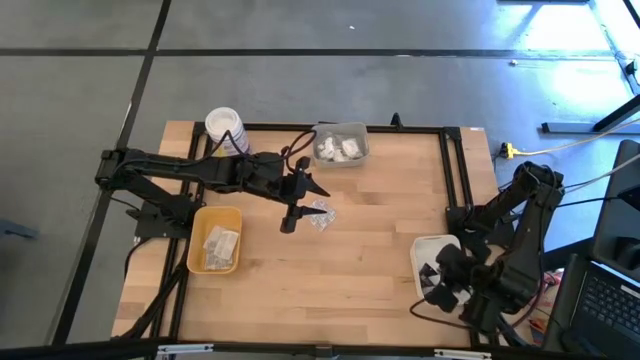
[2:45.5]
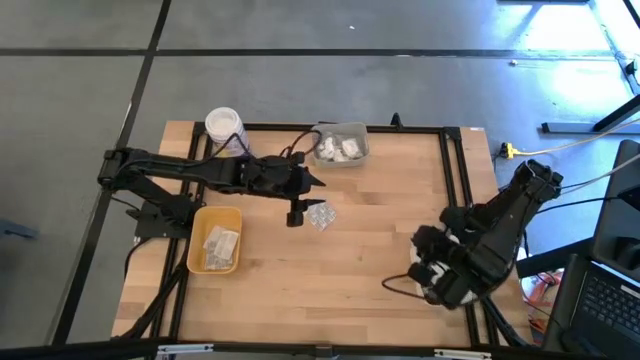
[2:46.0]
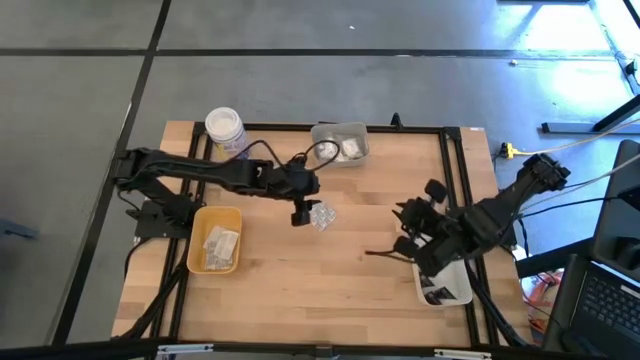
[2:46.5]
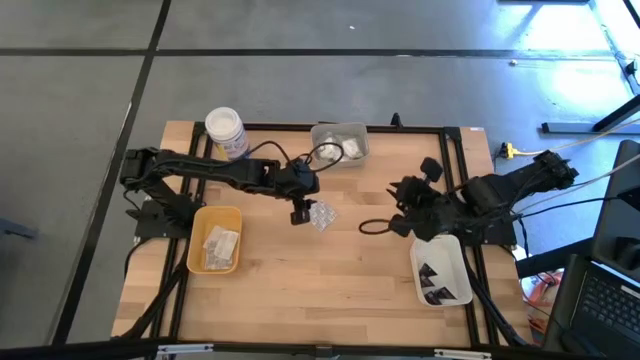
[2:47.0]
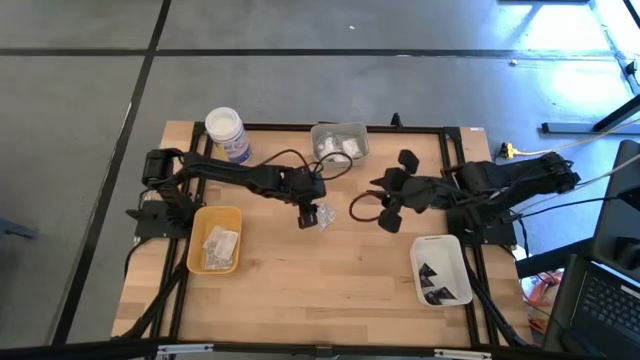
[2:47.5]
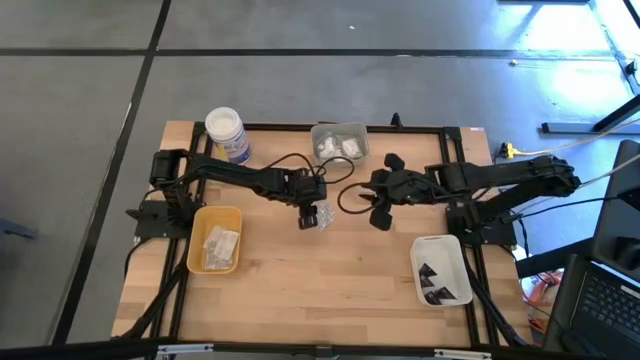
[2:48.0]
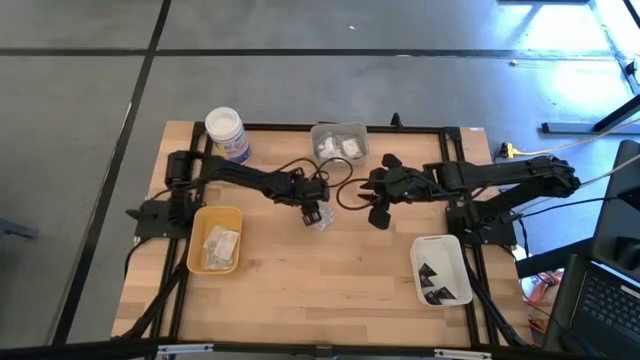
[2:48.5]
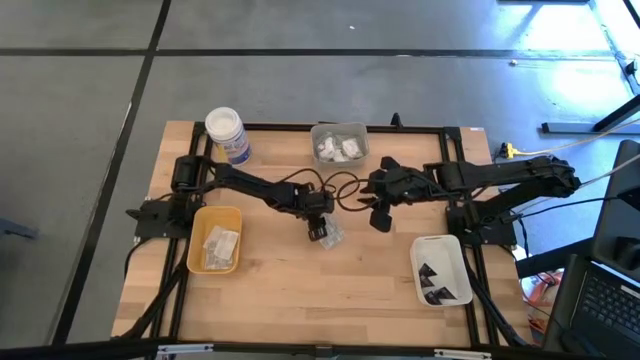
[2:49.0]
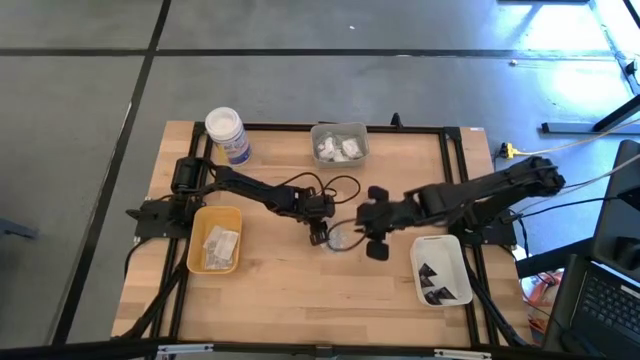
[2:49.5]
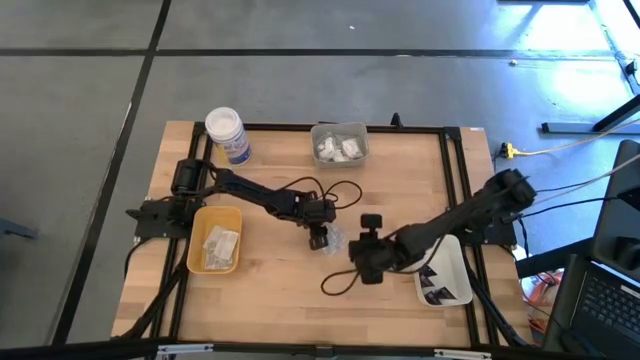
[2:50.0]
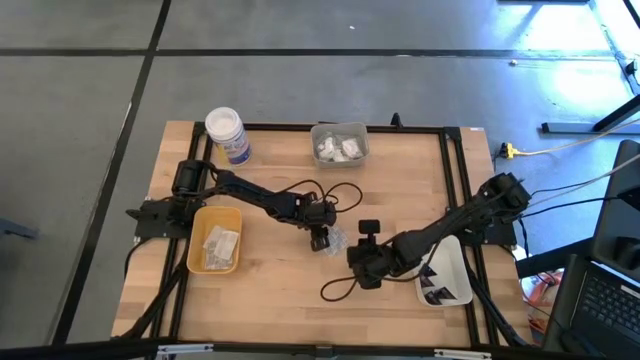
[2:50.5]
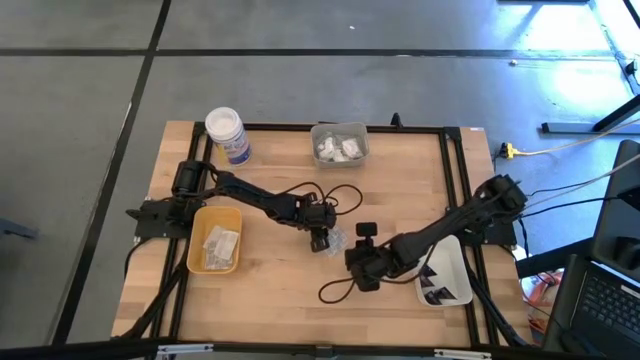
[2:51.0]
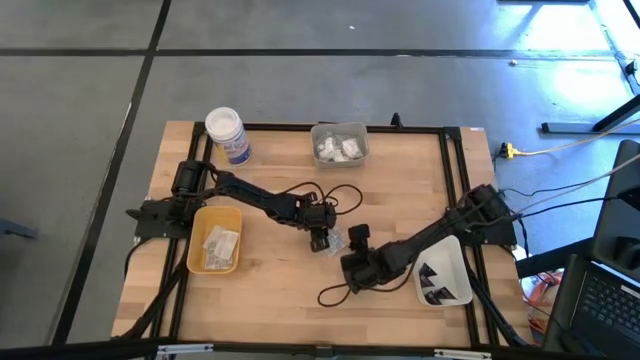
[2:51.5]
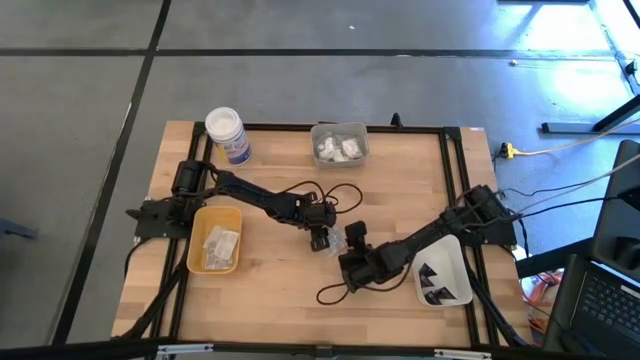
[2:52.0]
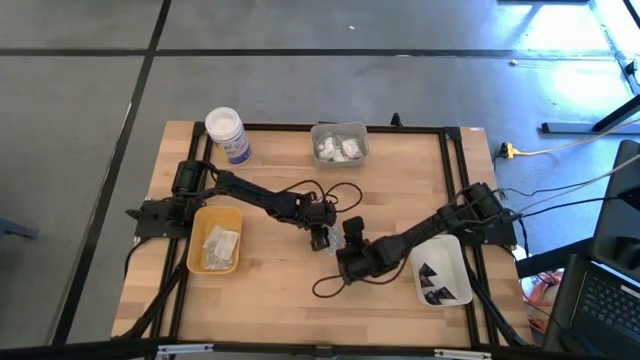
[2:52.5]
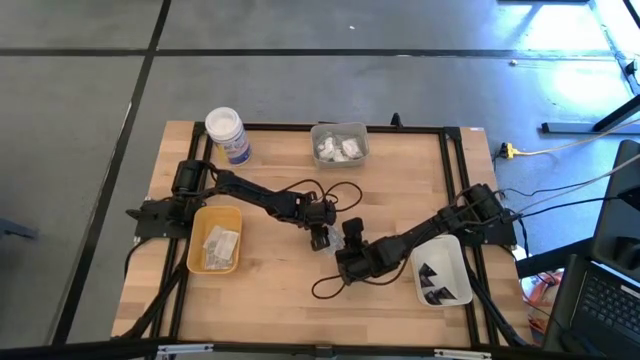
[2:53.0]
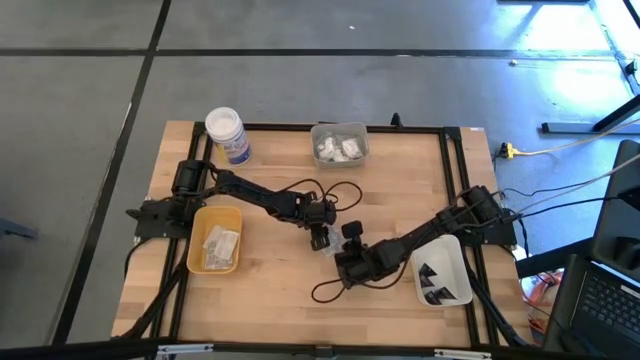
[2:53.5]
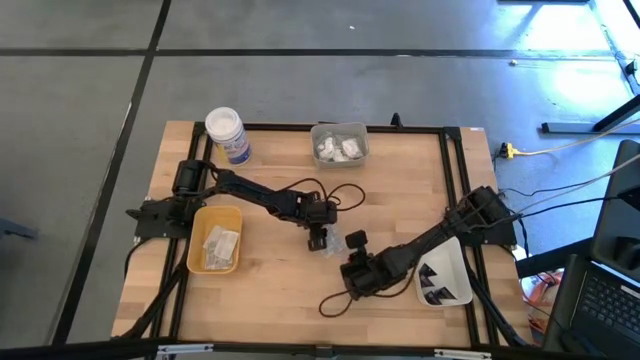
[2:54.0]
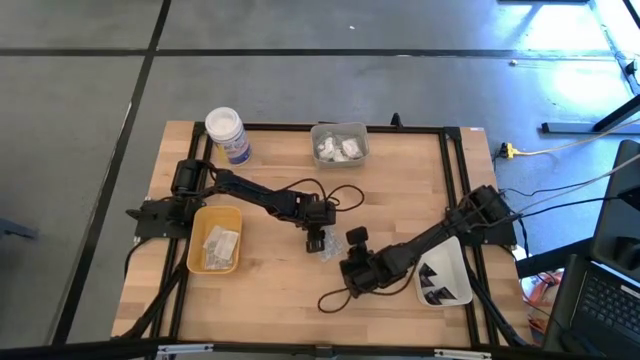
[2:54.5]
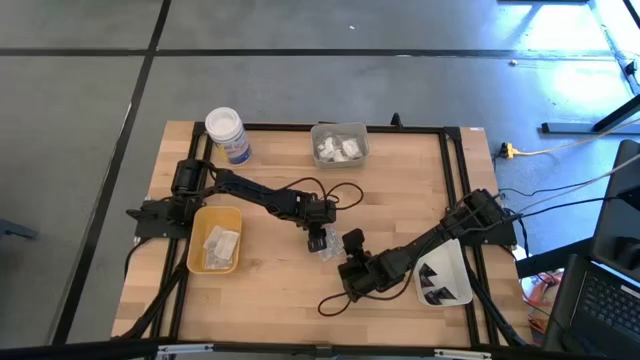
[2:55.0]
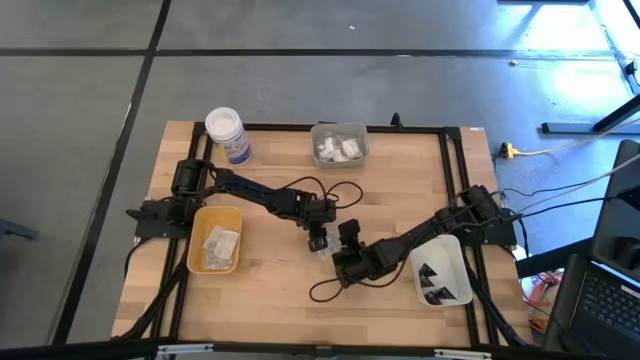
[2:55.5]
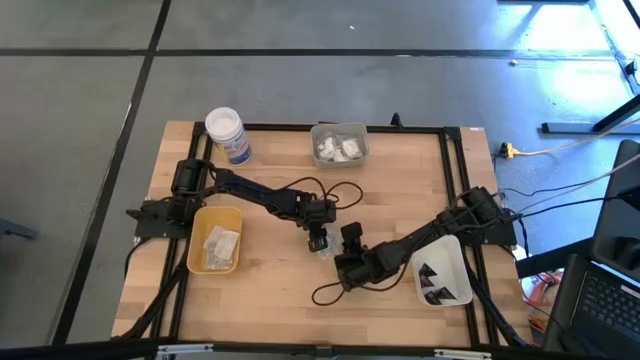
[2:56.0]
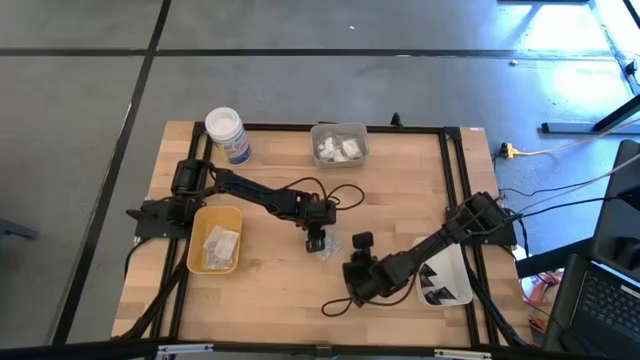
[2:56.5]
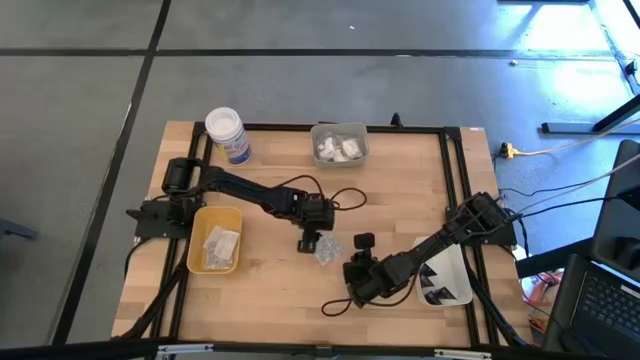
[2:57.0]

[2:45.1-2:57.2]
Task: Pick & Place Travel size toiletries
Put the white bandage pack into the yellow bin

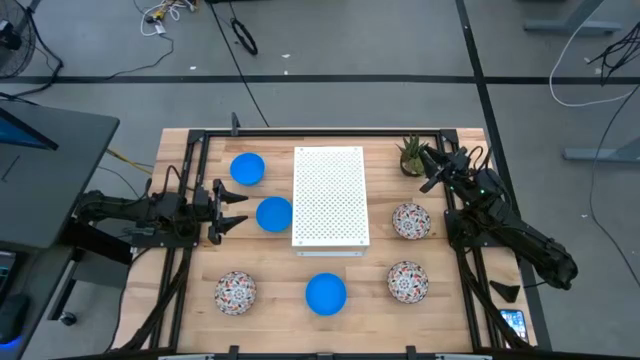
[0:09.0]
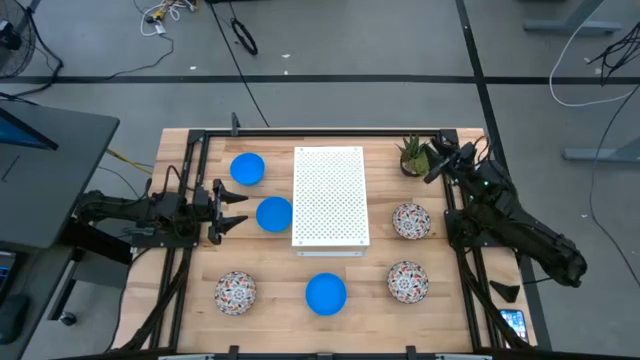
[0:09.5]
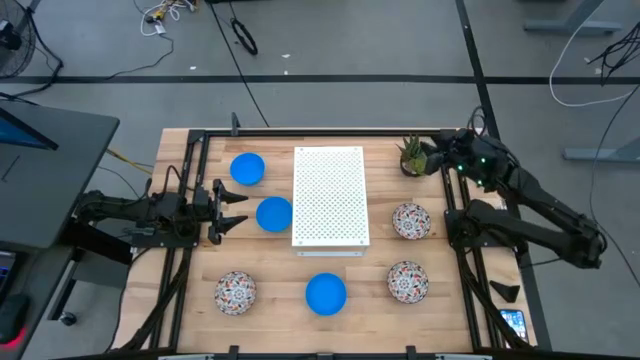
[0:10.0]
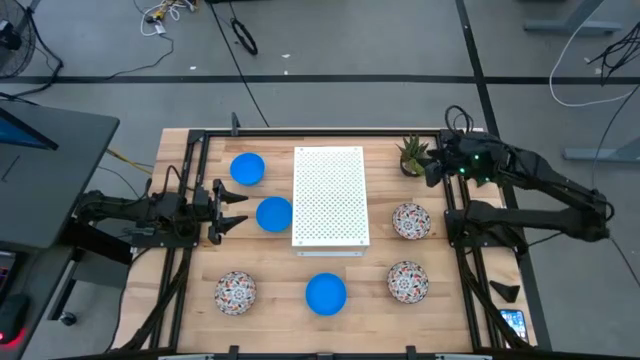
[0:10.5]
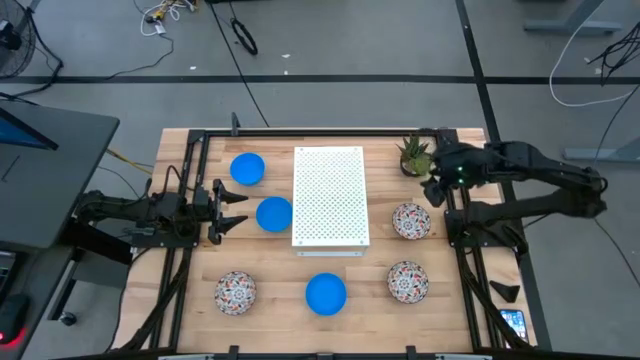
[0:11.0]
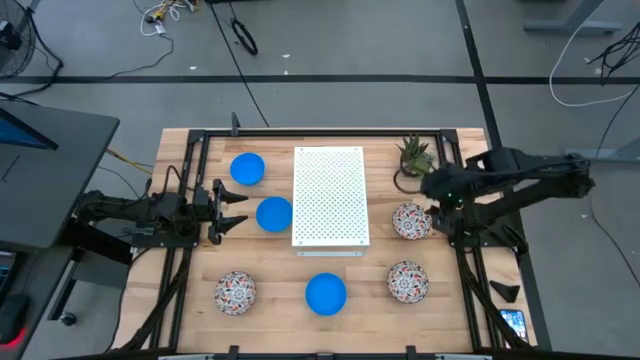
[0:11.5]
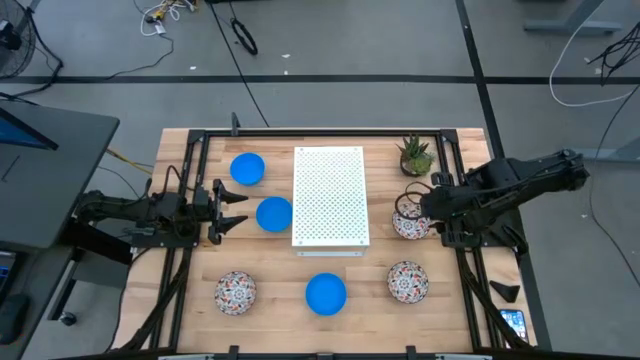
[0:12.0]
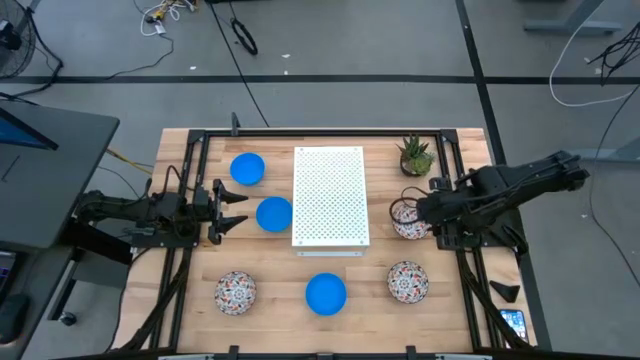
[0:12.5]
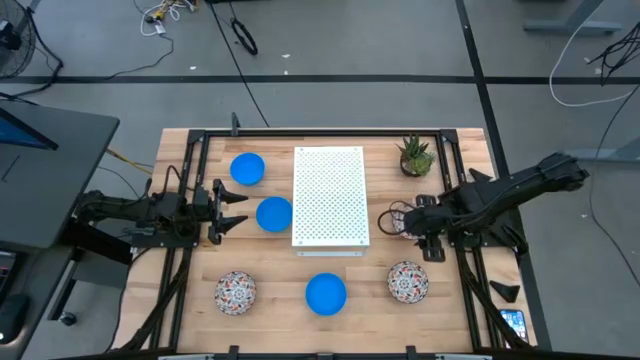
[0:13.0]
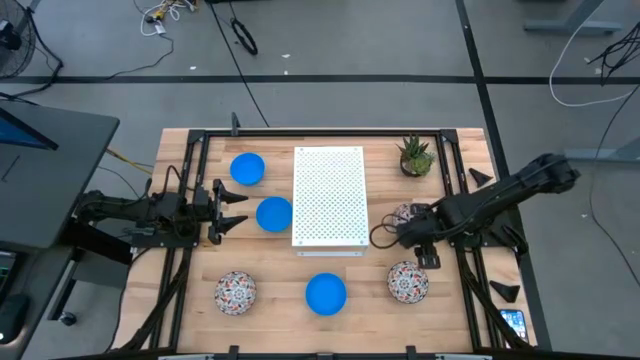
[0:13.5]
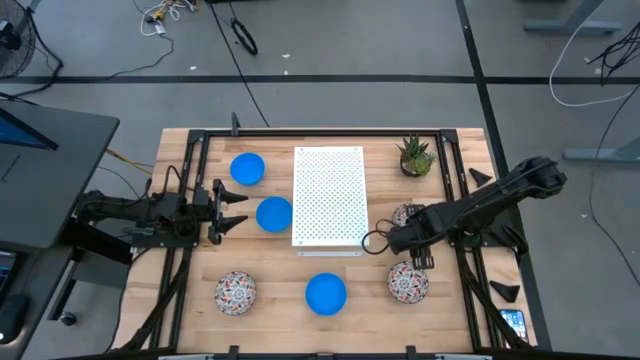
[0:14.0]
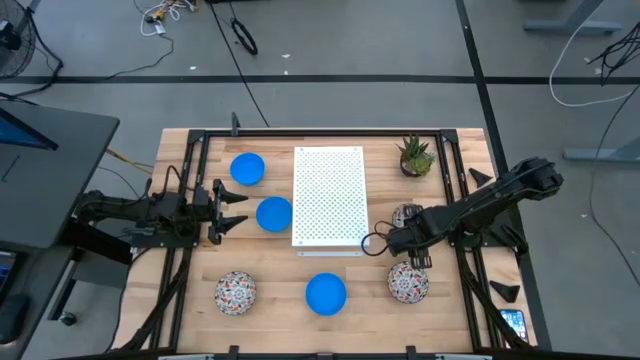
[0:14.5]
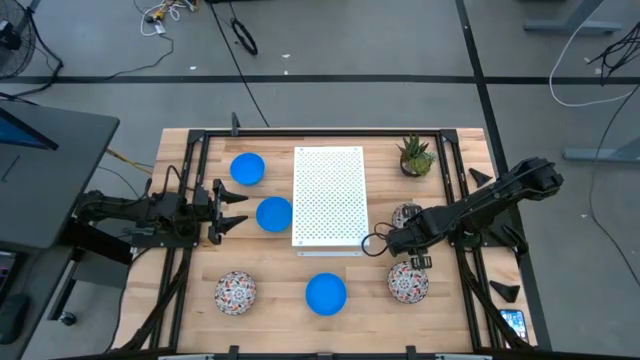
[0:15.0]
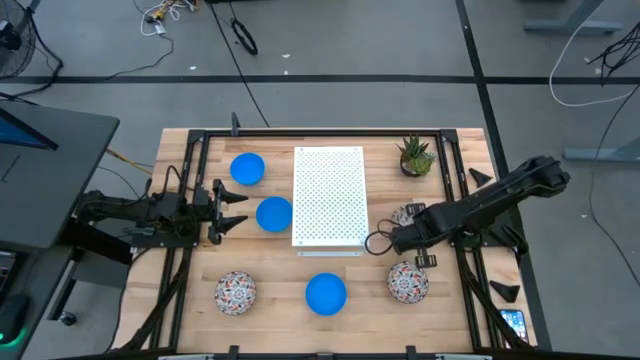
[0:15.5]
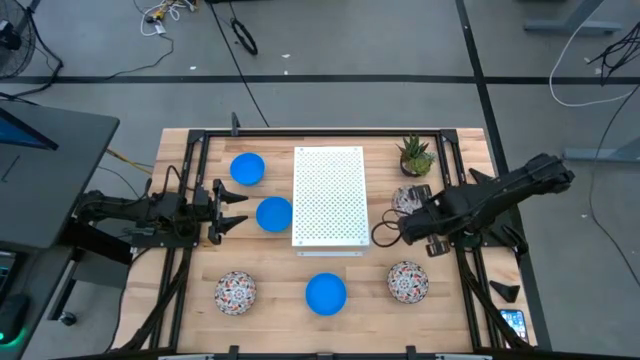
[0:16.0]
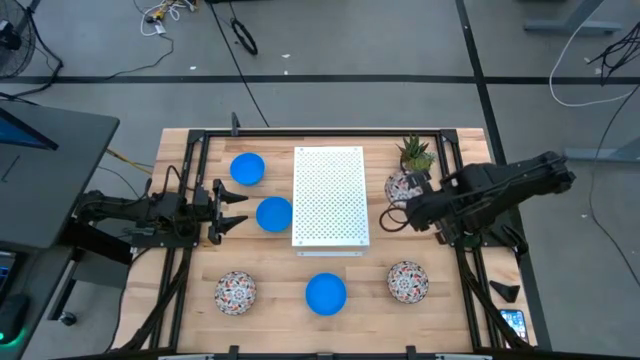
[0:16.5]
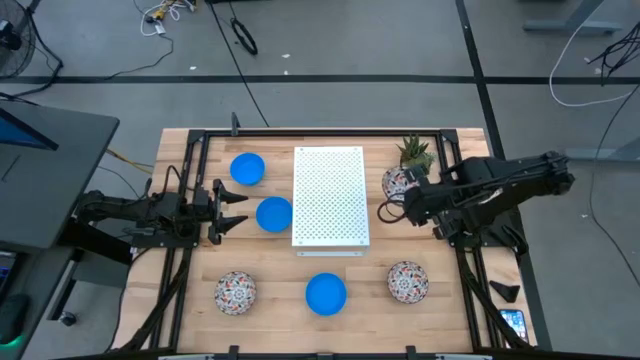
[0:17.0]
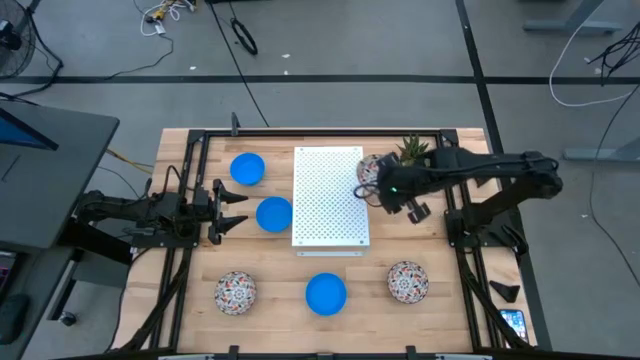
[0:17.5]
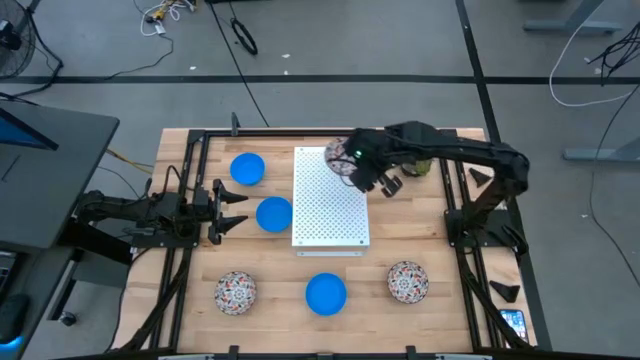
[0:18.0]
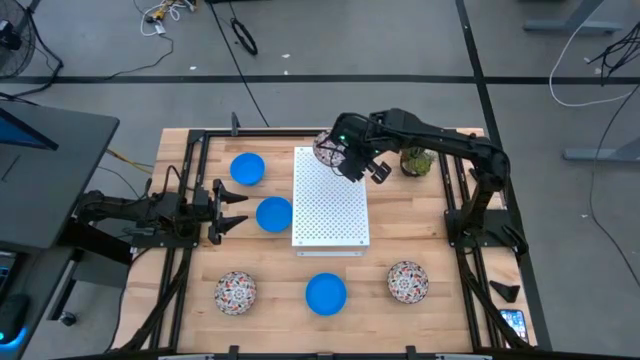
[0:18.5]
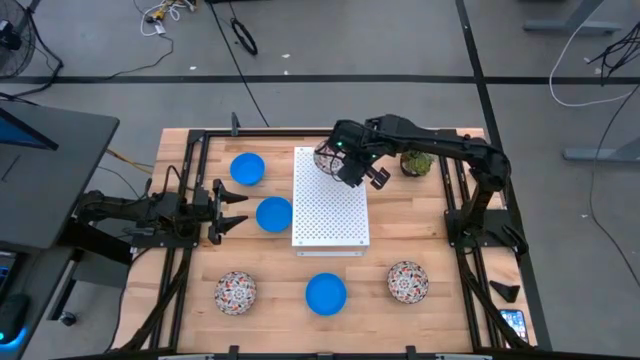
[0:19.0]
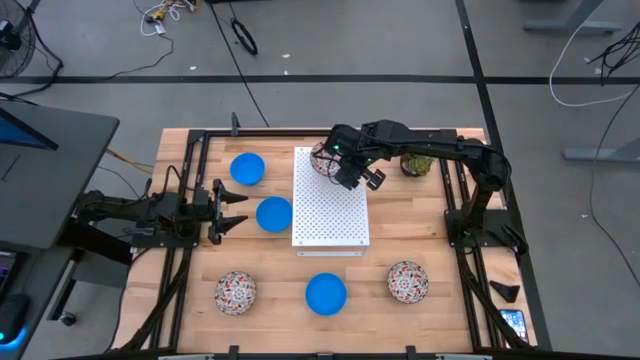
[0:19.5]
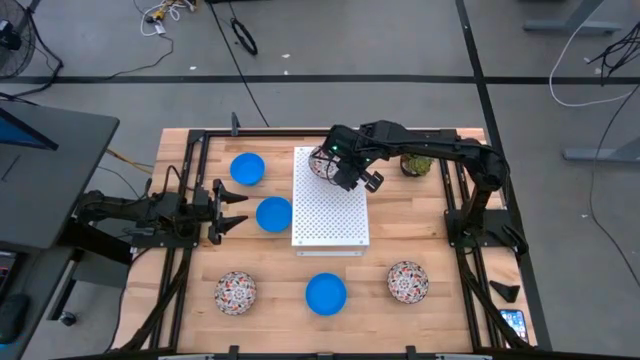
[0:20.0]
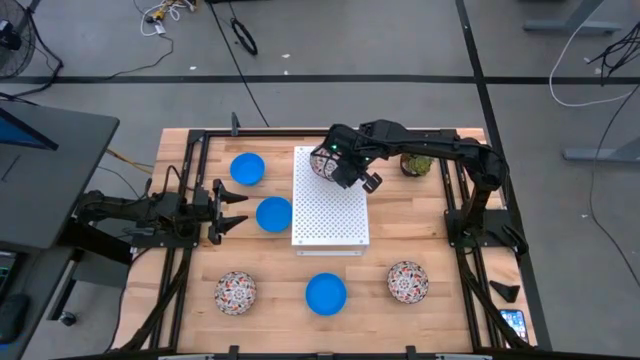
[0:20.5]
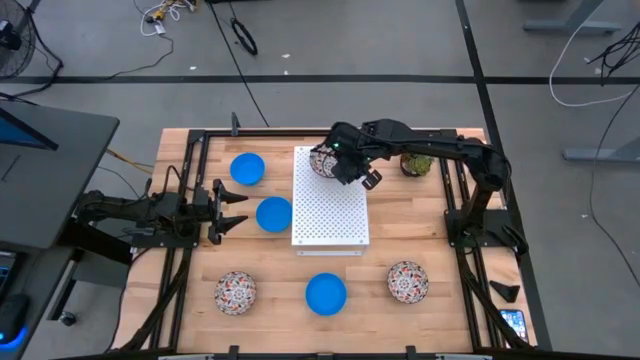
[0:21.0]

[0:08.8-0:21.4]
Task: Pick & Place Mini bowls
Put the top right white bowl on the shelf
